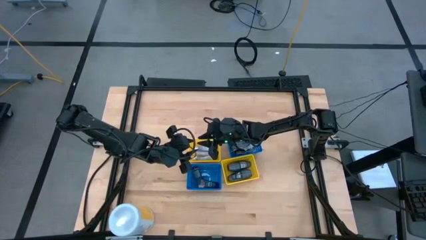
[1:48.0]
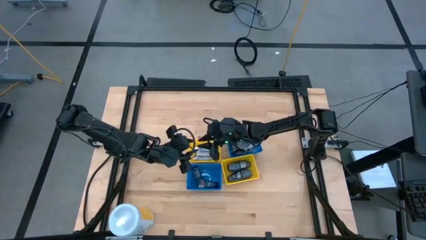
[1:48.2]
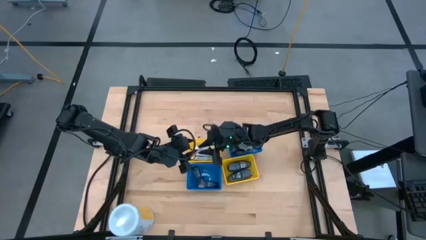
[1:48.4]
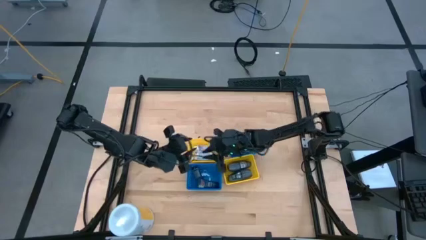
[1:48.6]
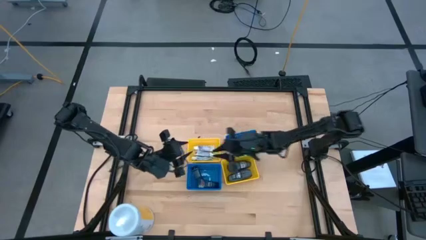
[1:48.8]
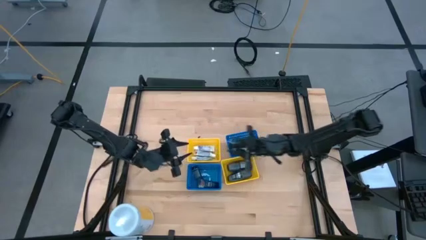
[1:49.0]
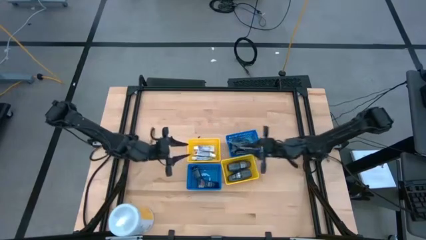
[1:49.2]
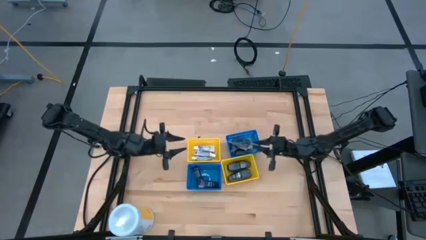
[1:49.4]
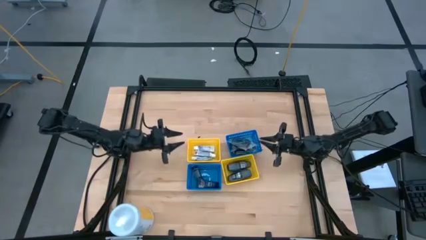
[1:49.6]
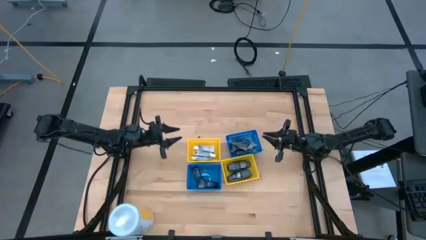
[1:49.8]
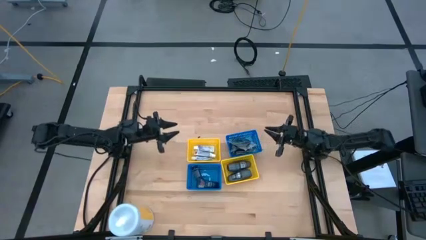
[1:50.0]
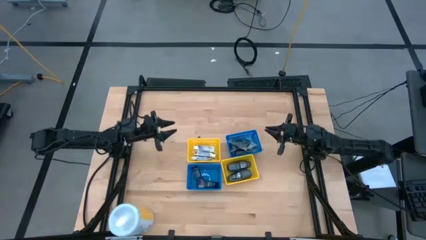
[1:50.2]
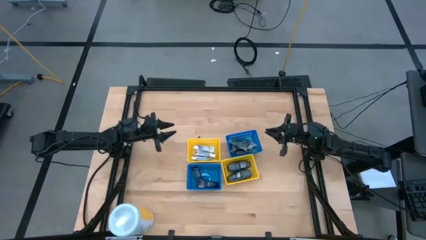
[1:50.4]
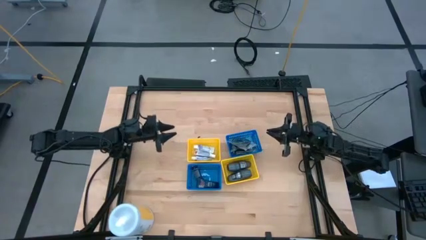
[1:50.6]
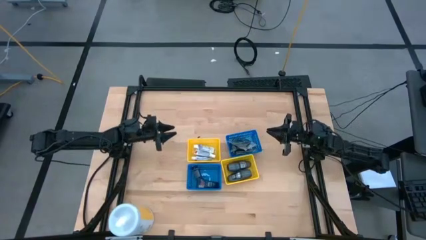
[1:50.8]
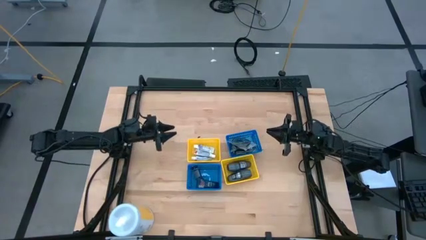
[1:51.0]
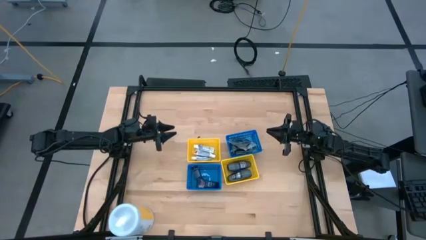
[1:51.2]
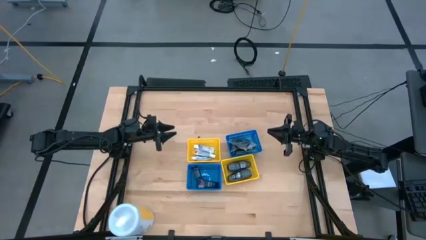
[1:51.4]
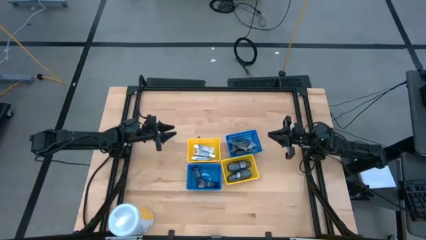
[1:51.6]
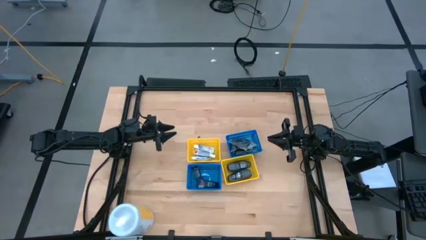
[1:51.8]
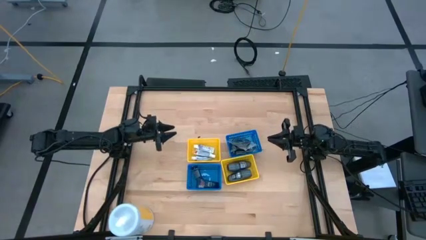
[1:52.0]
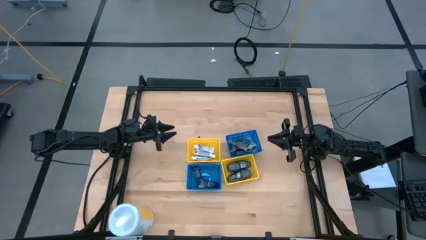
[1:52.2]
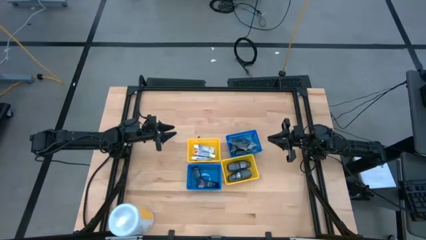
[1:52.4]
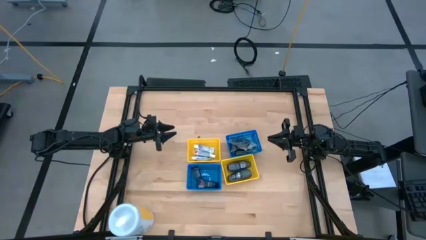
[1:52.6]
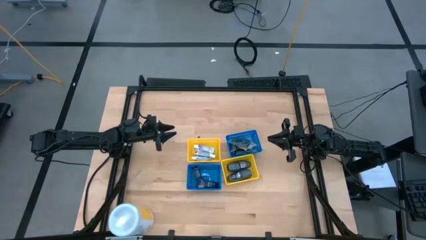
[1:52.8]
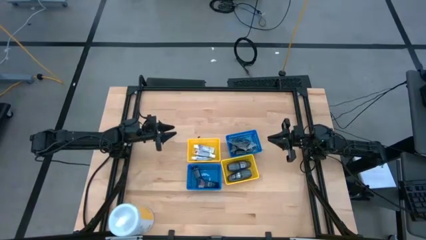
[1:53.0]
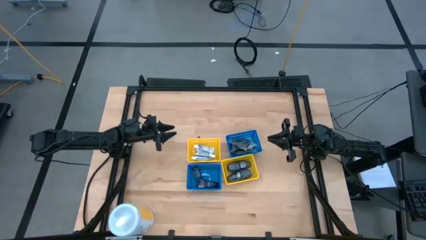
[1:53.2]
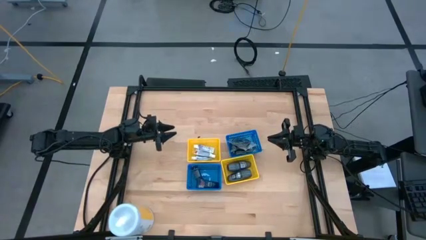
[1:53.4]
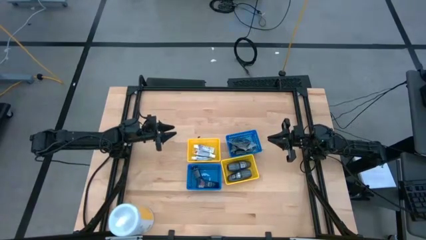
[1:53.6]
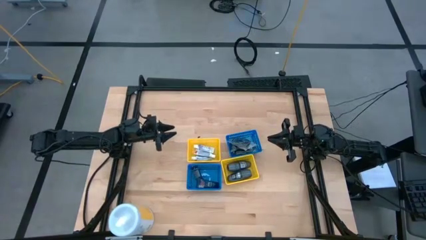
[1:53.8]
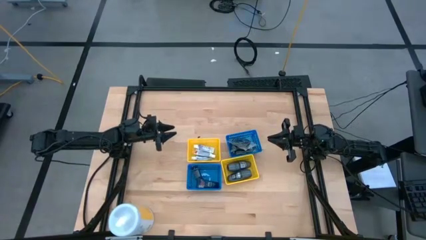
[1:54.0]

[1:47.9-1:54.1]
Task: Pick & Place Travel size toiletries
Return to Home Position

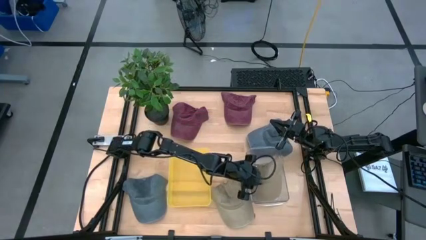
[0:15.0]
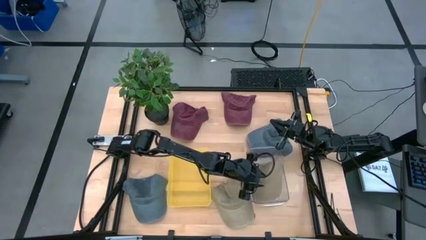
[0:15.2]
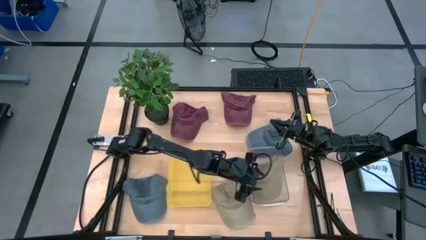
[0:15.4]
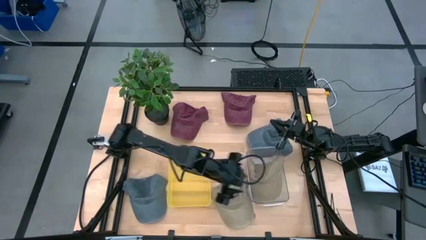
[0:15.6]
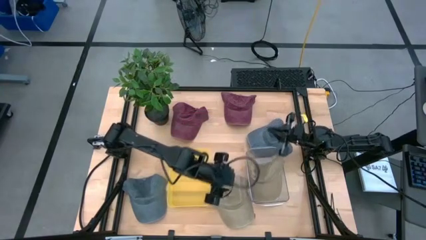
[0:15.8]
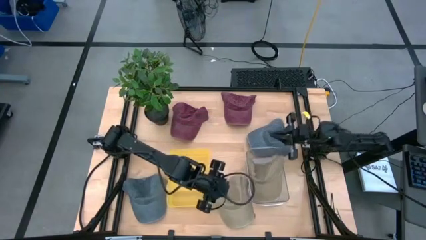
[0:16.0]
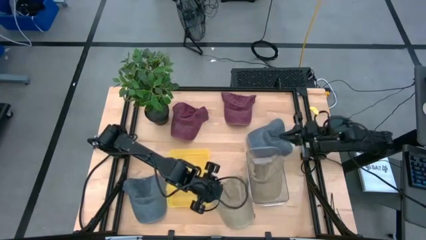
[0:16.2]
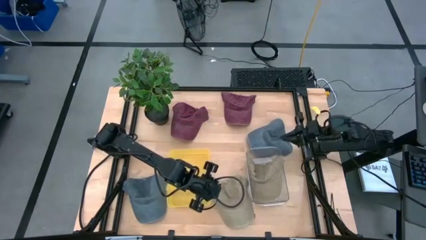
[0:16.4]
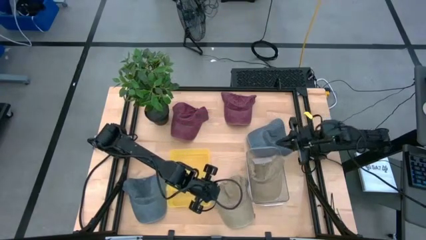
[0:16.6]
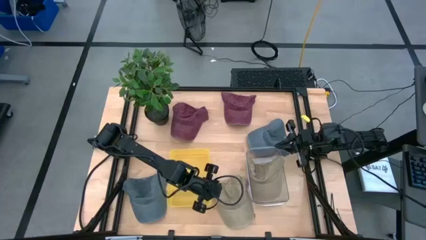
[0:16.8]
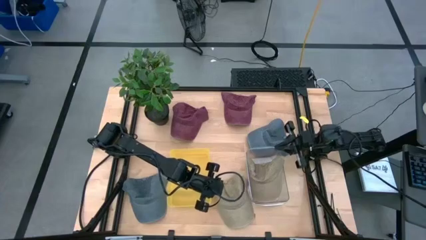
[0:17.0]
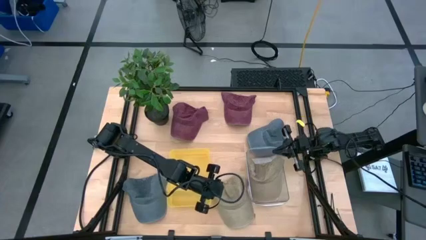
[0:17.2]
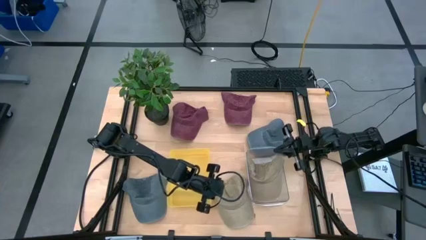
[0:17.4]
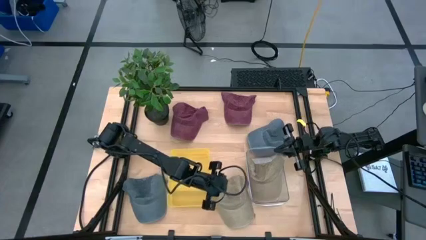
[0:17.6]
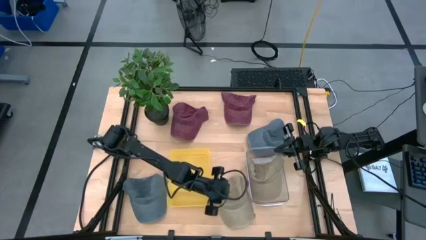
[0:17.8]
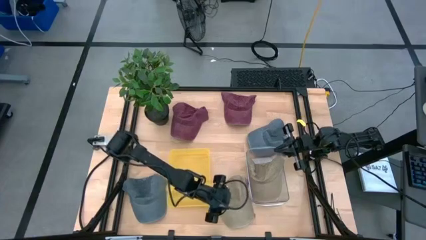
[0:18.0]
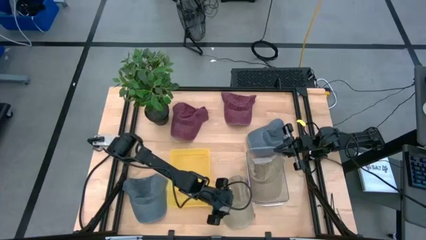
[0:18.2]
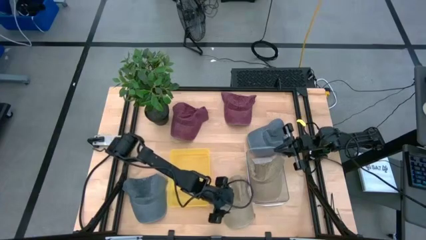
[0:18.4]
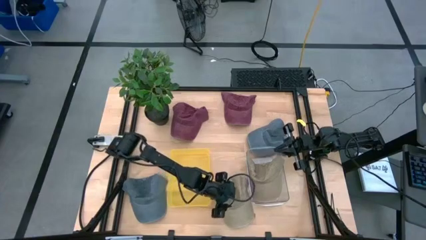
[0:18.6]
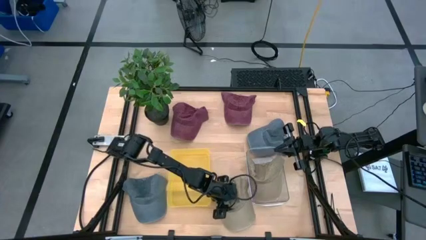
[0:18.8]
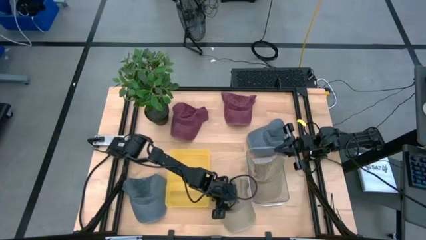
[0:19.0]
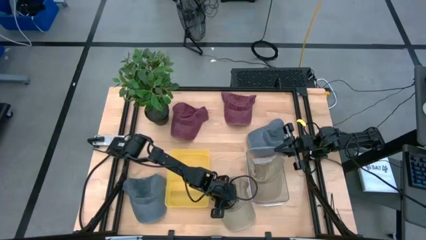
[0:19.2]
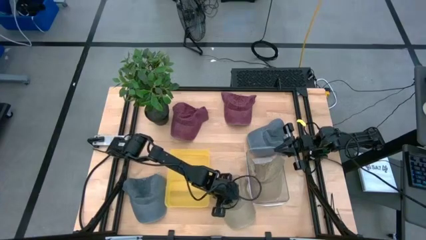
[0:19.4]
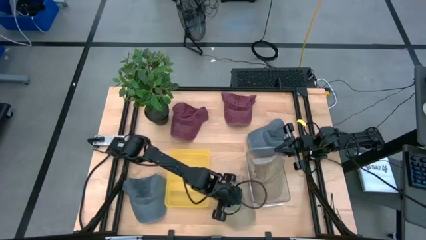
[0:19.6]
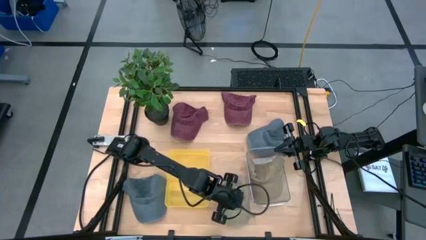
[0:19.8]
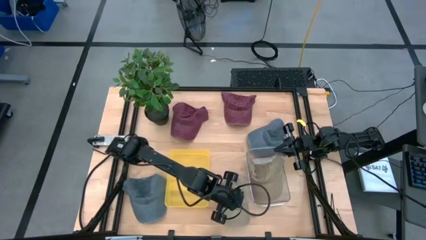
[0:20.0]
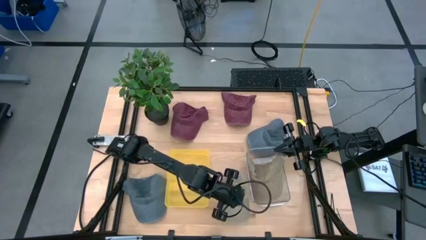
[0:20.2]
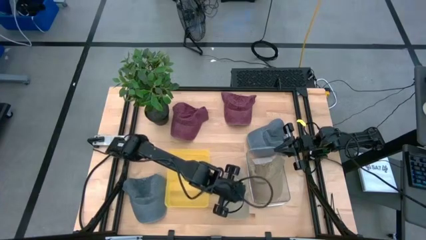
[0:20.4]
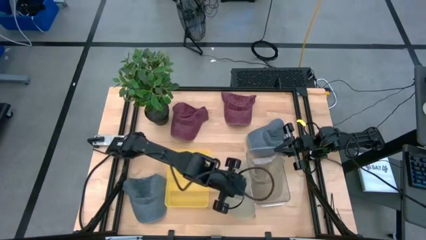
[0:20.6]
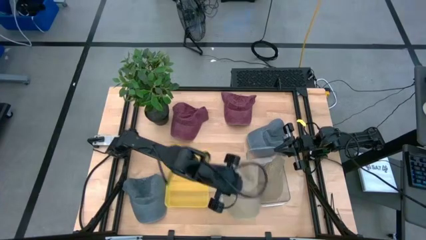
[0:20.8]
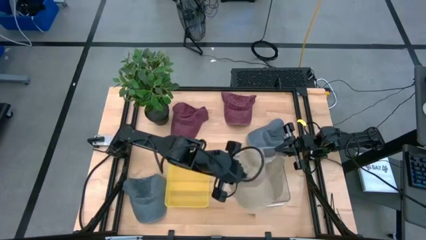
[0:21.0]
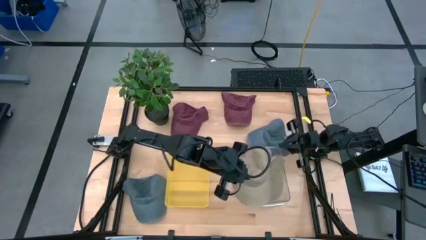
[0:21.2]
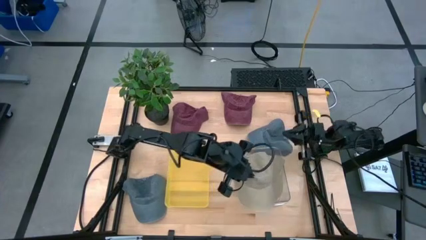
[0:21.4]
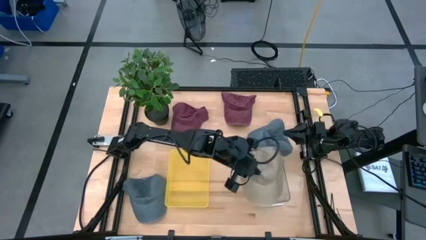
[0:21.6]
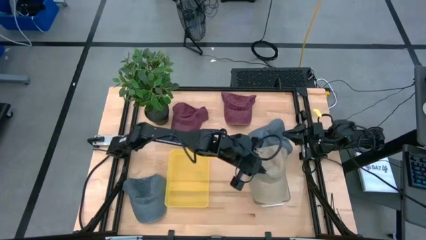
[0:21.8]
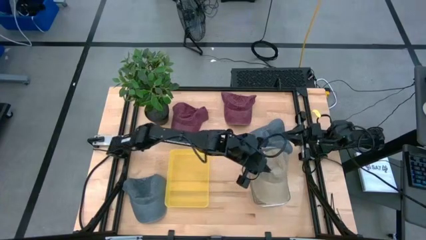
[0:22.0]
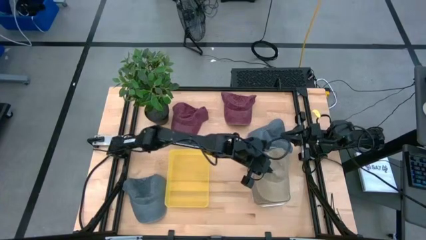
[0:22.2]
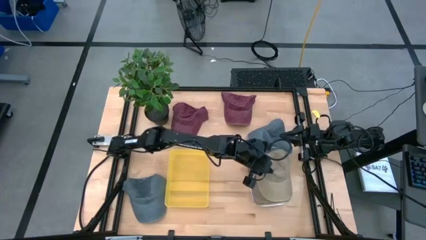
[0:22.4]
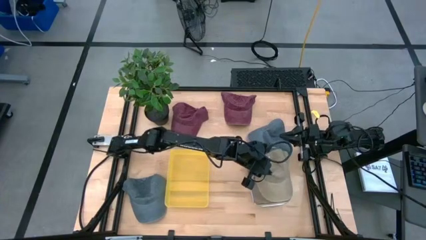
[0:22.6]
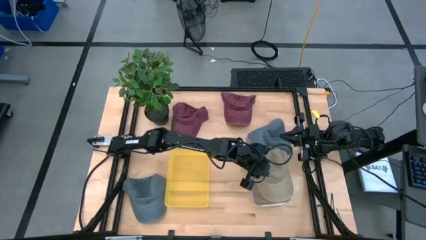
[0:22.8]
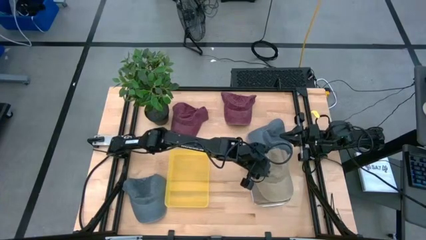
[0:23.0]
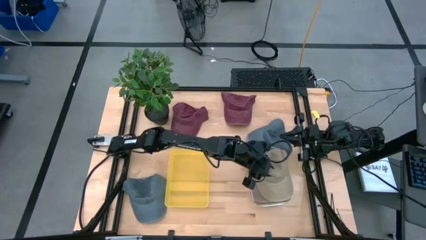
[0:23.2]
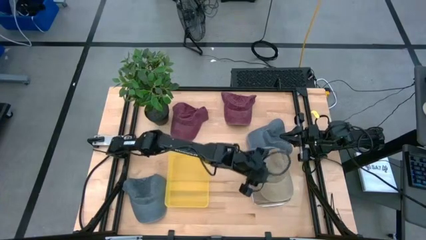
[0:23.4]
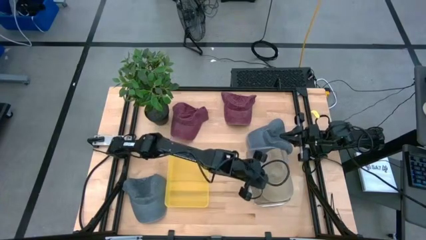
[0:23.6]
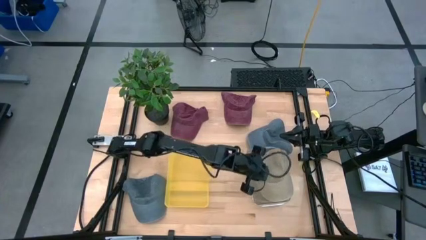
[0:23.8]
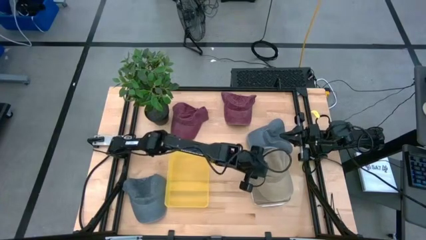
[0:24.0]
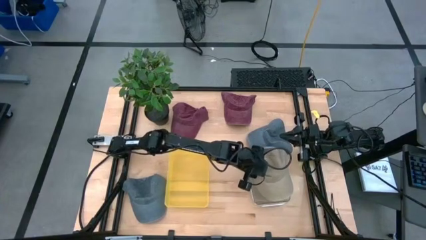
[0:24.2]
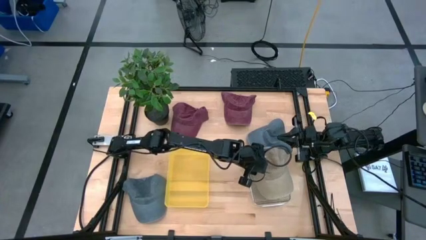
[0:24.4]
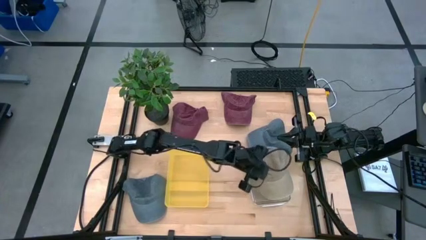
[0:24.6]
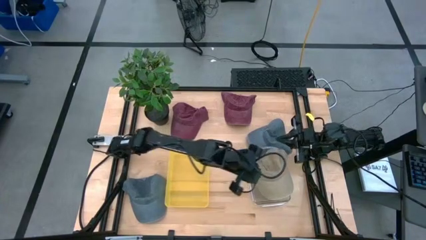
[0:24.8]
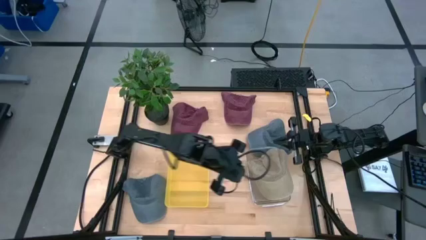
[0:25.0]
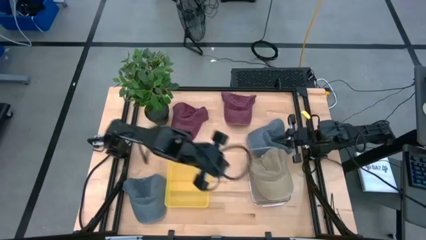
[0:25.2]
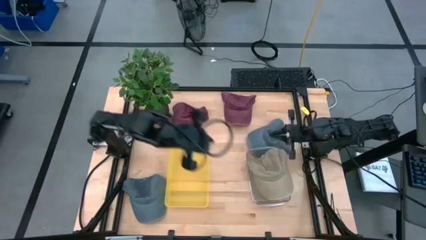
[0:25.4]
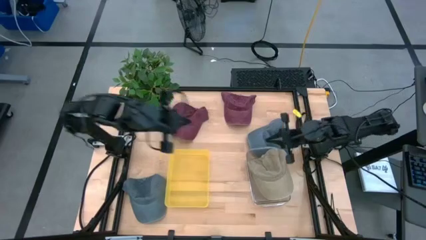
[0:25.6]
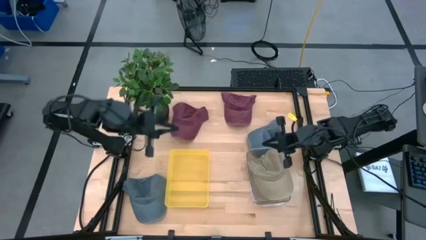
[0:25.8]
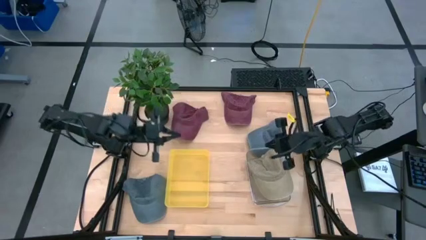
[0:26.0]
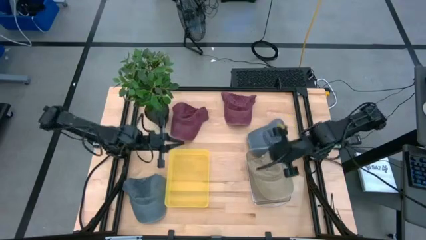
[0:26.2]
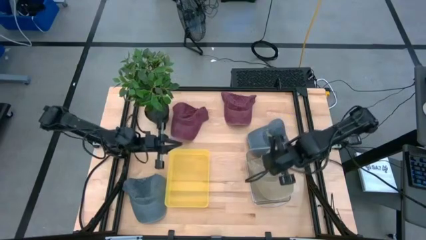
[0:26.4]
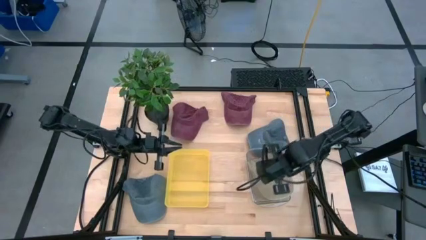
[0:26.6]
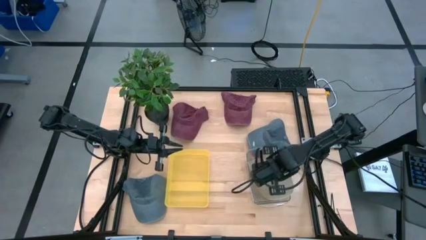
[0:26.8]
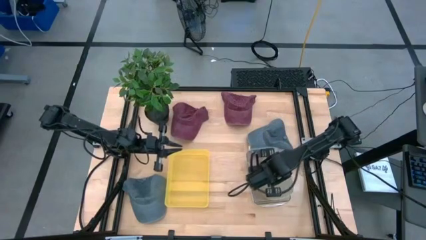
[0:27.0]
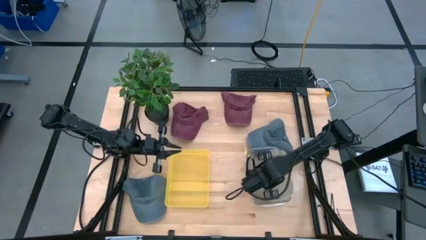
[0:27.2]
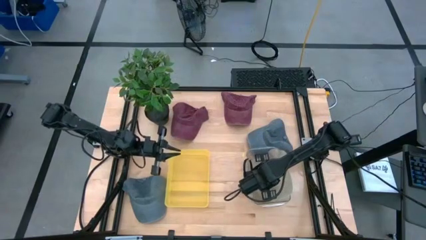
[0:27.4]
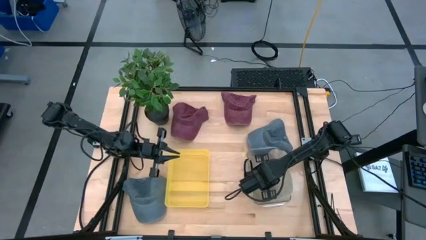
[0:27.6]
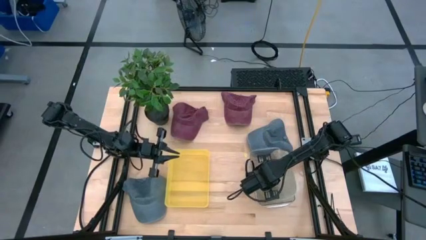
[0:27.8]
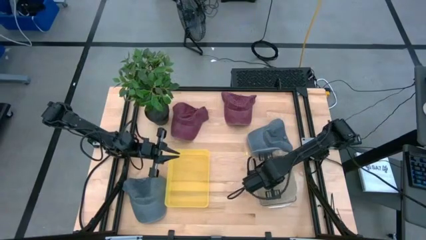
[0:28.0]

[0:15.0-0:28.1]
Task: Pick & Place hat
Put the brown cap into the transparent bin
